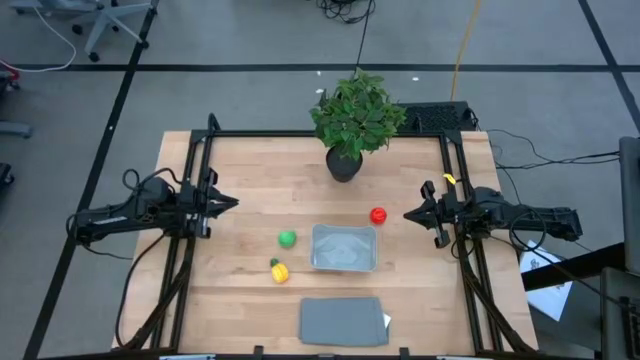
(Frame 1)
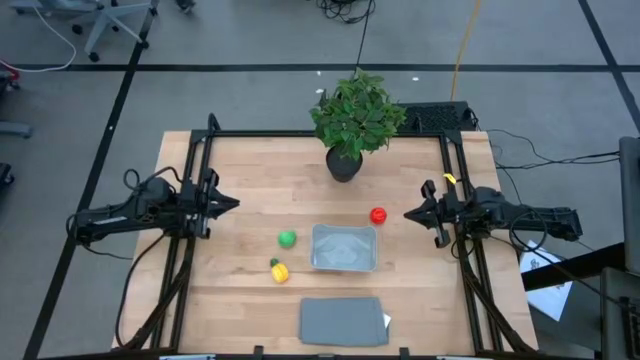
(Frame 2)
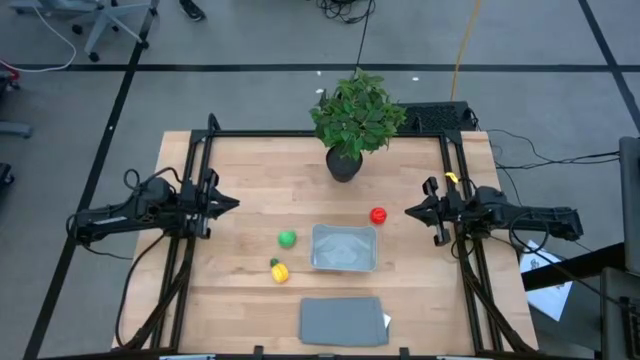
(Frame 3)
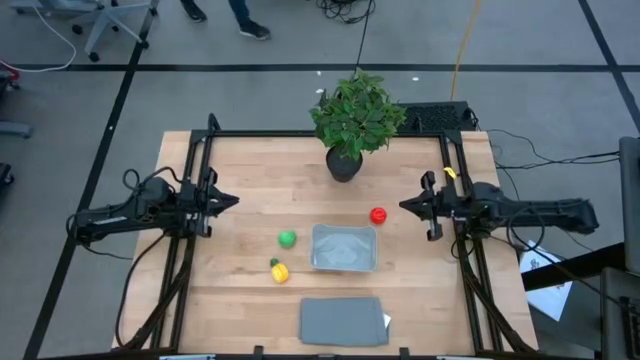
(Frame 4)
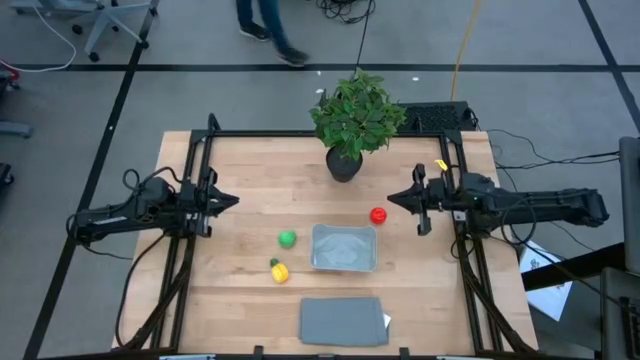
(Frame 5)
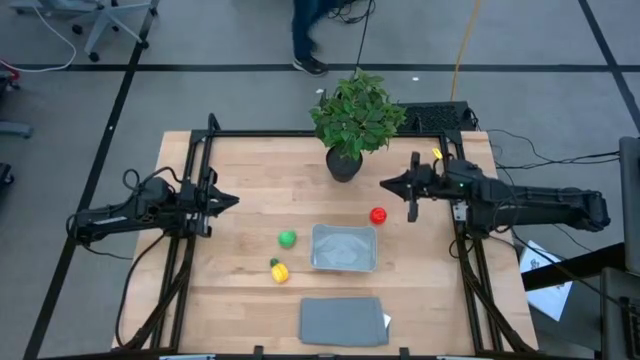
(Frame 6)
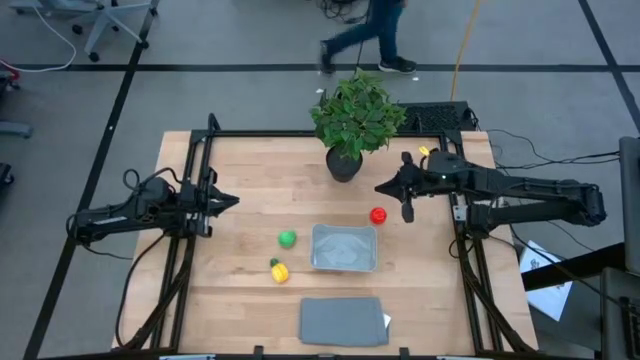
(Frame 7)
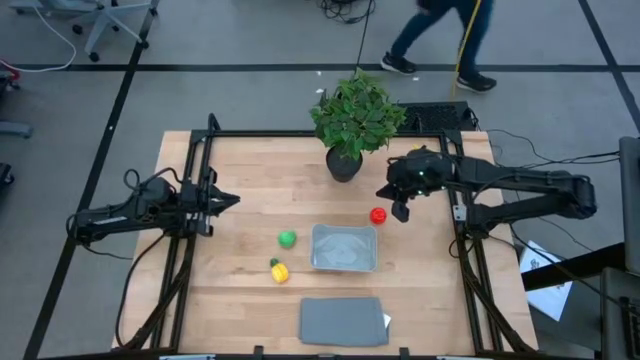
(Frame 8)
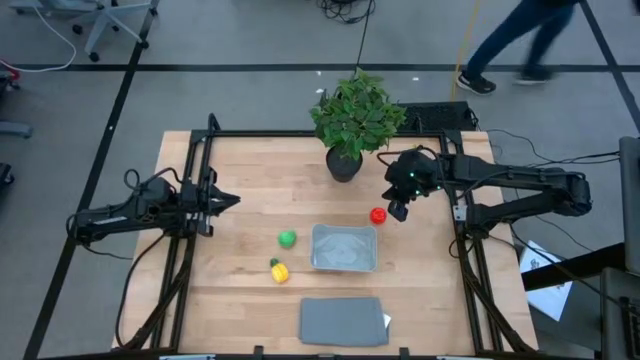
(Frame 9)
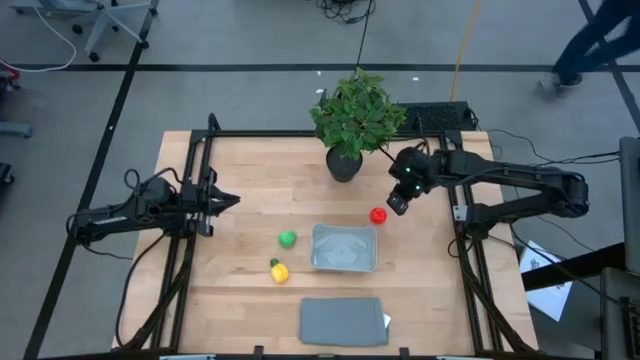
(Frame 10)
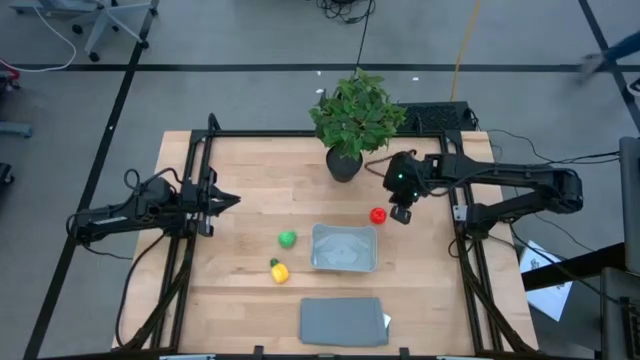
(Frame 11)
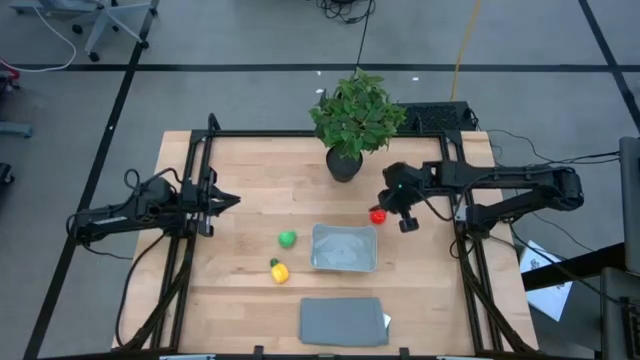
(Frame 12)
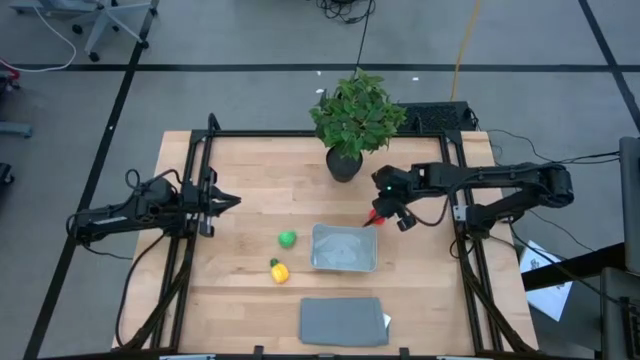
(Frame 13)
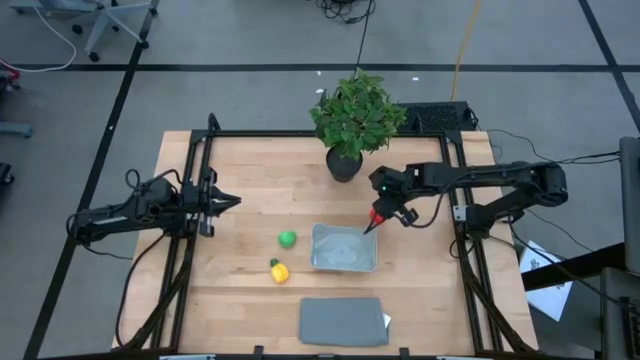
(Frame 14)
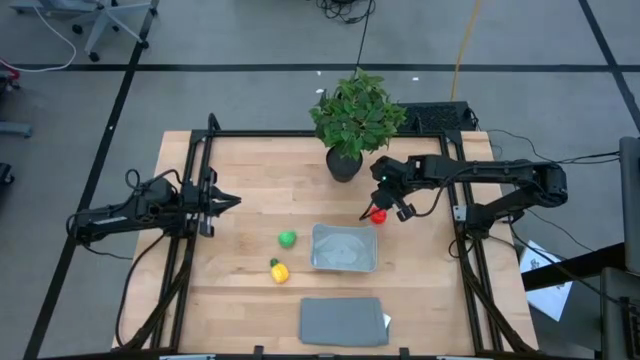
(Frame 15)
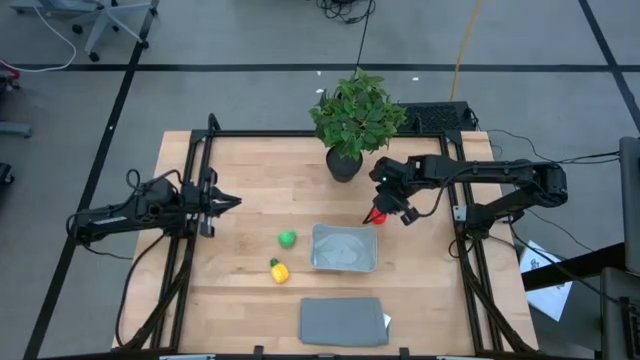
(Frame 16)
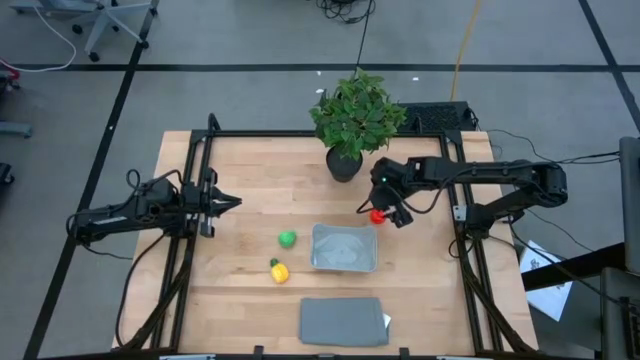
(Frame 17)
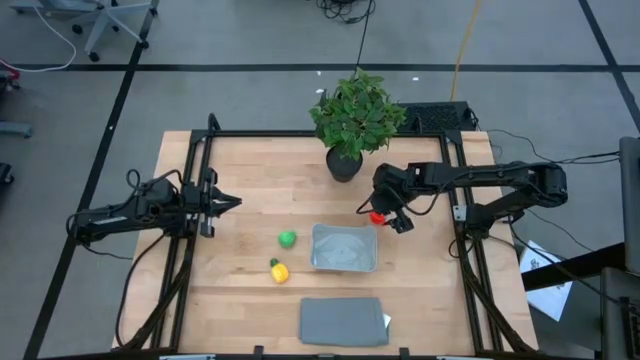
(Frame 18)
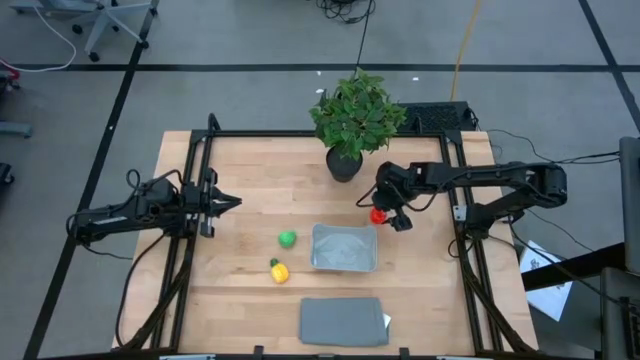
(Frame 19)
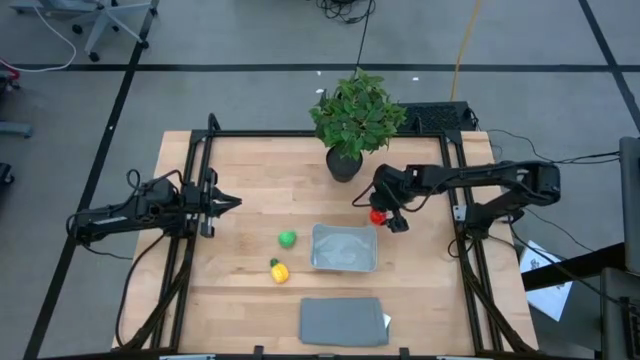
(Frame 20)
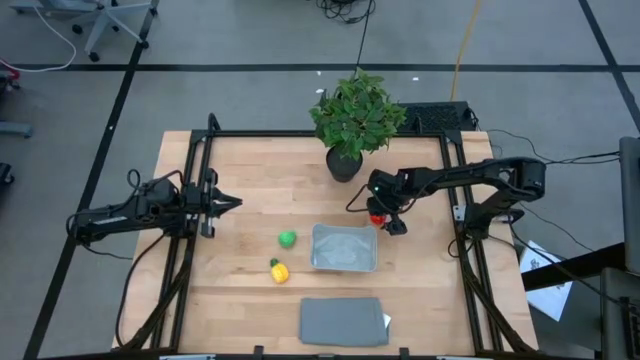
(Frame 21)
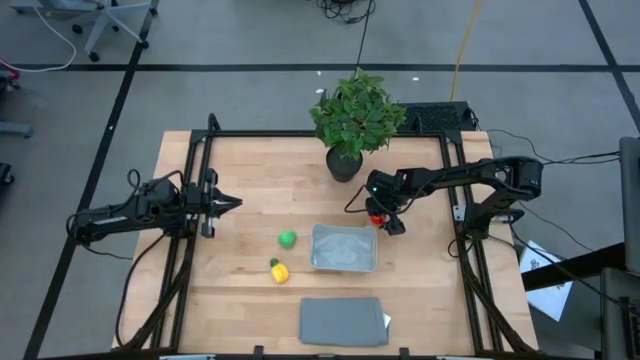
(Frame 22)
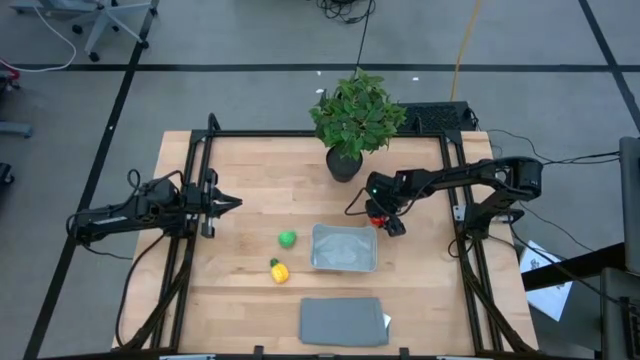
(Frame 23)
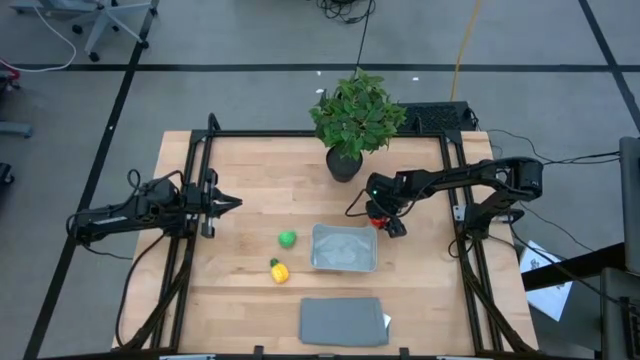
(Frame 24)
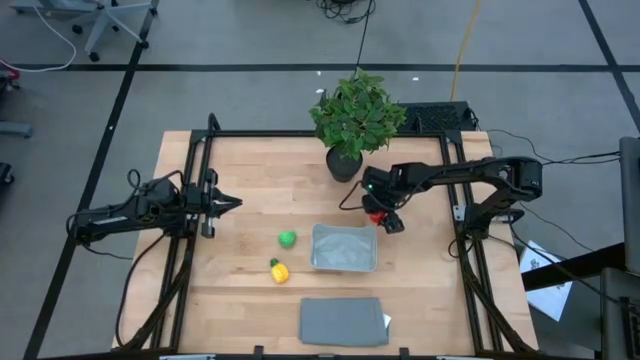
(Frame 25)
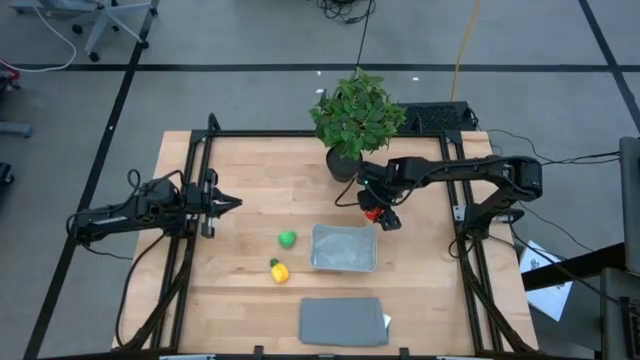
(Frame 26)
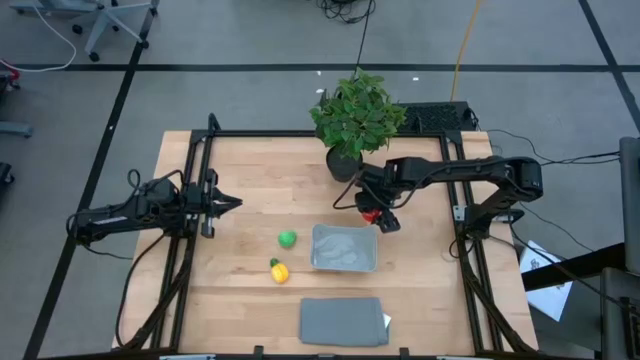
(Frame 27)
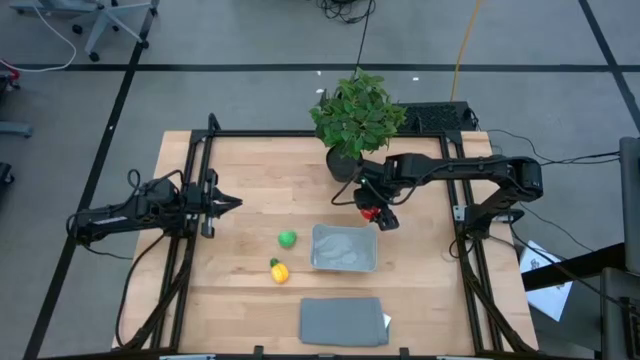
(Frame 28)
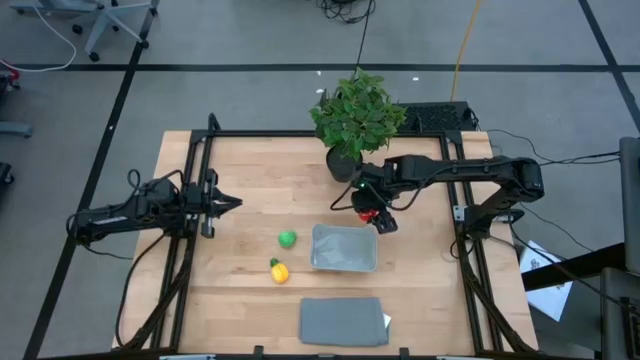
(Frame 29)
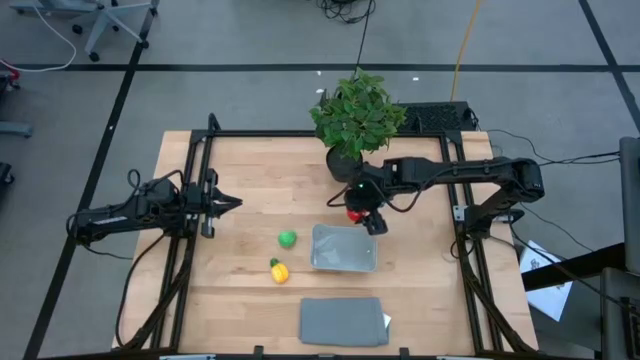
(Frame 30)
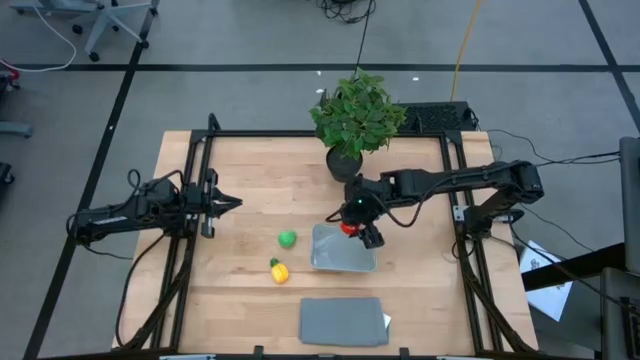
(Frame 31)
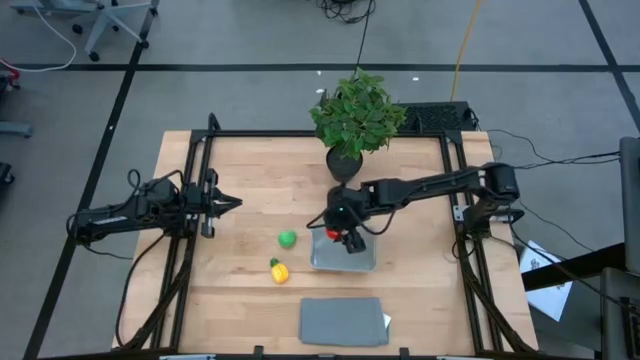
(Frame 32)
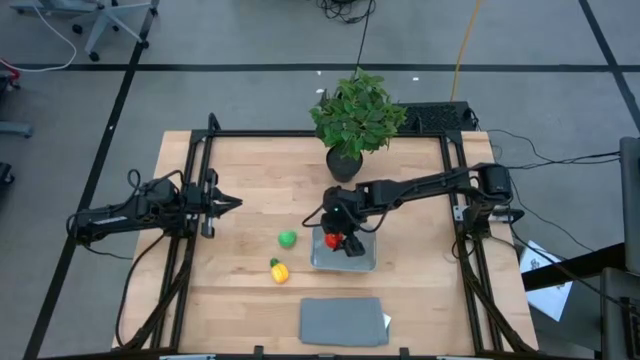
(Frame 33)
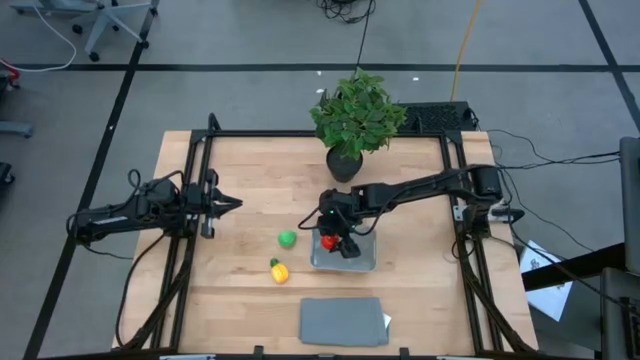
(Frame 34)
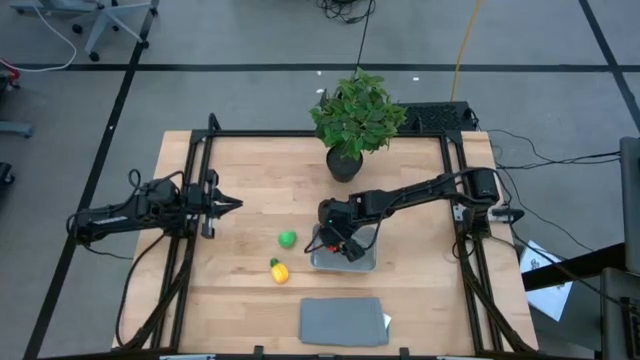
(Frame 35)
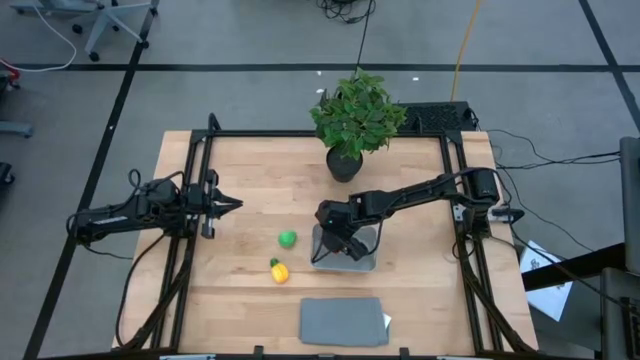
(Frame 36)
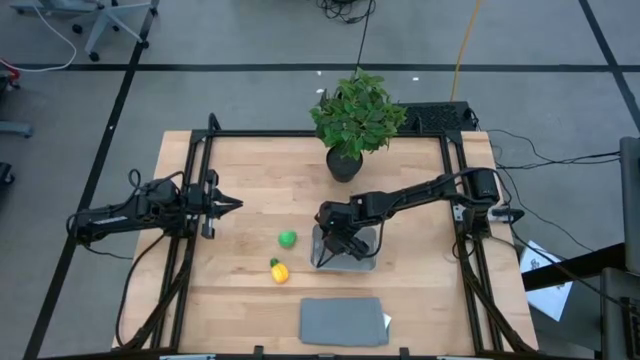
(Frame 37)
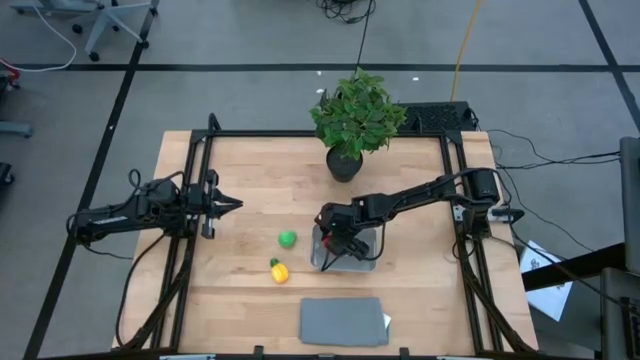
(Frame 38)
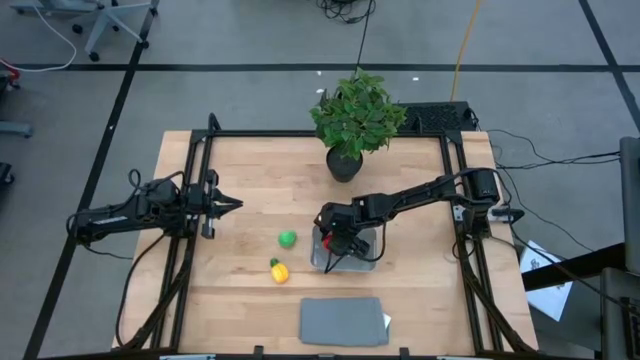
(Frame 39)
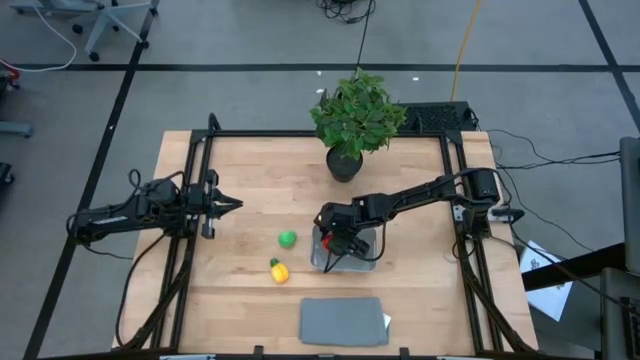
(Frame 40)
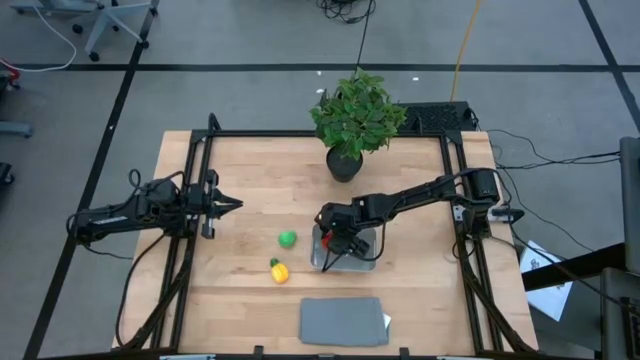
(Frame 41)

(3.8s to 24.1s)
Task: Pick and placing Produce into tupperware
Put the tomato into the basket
